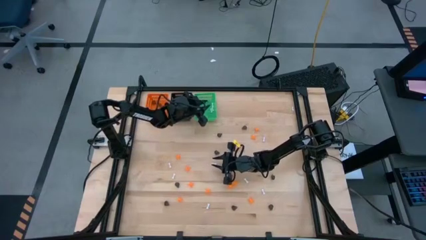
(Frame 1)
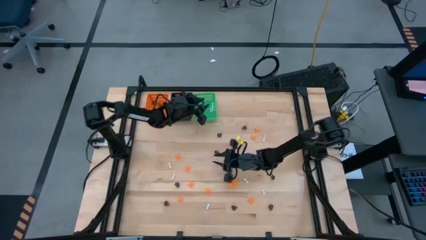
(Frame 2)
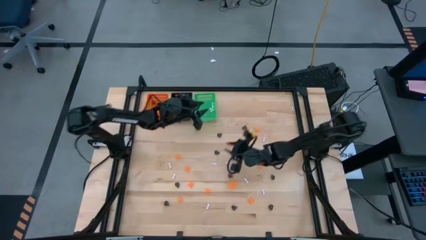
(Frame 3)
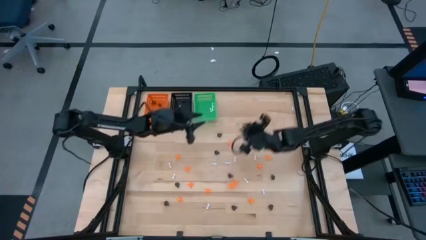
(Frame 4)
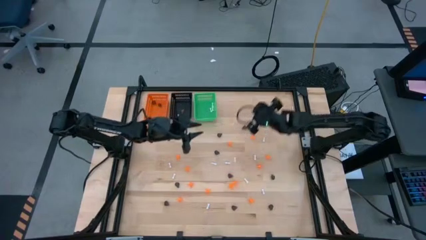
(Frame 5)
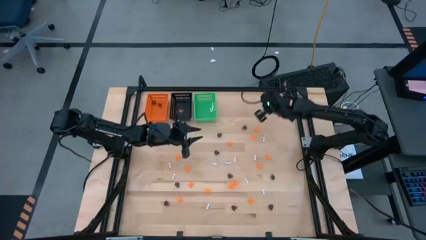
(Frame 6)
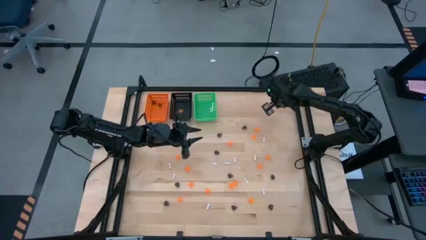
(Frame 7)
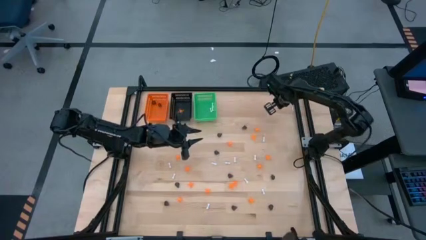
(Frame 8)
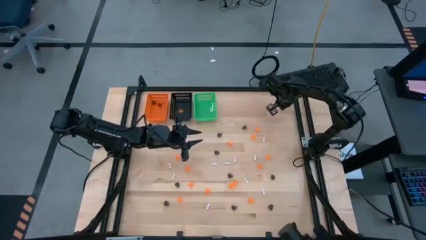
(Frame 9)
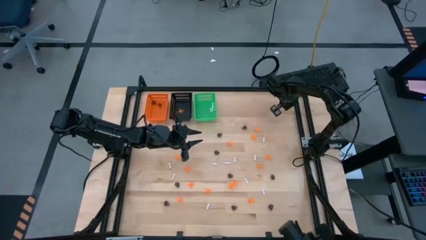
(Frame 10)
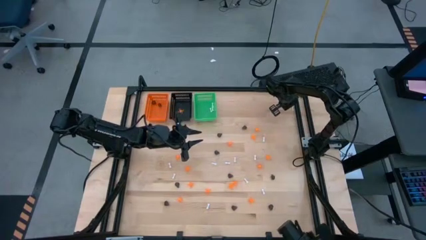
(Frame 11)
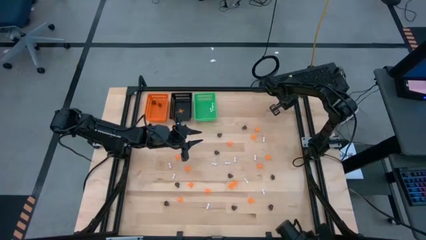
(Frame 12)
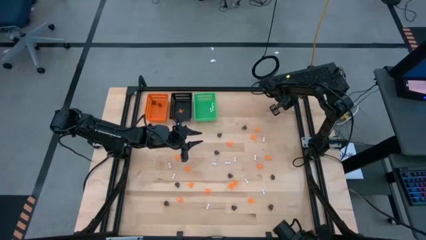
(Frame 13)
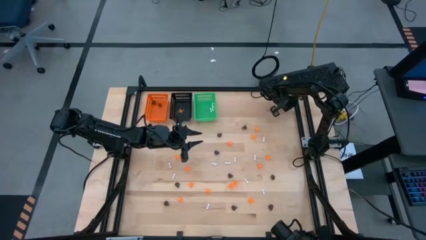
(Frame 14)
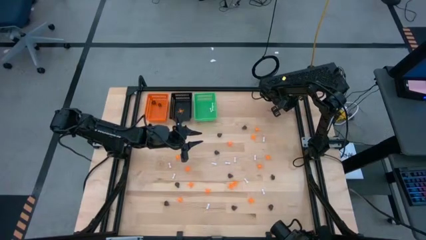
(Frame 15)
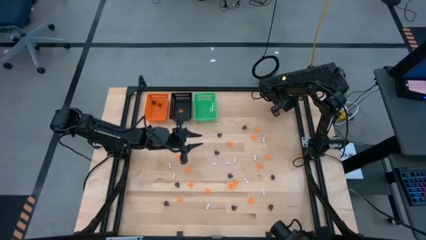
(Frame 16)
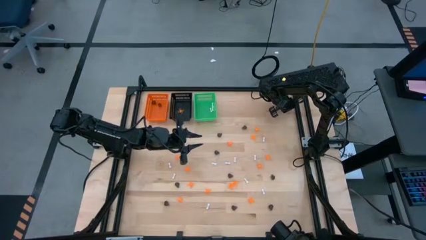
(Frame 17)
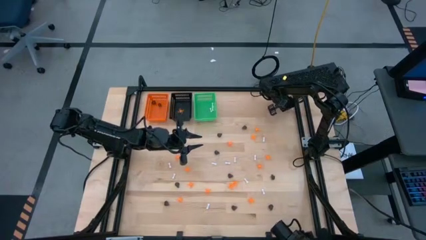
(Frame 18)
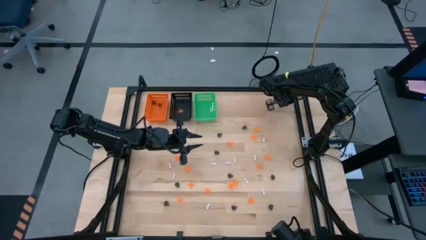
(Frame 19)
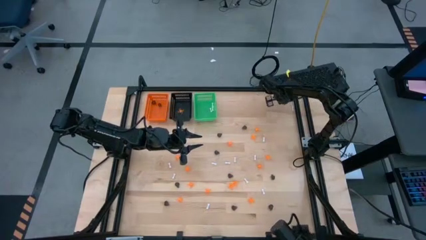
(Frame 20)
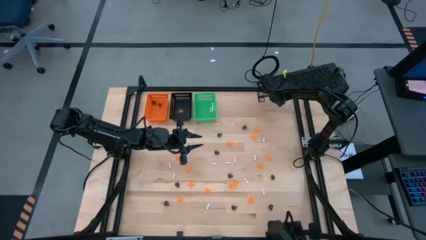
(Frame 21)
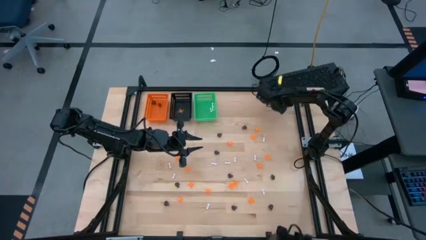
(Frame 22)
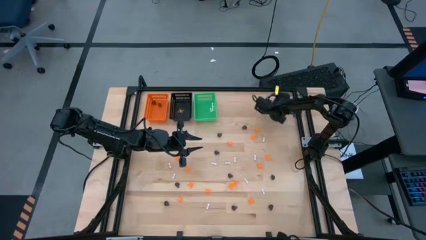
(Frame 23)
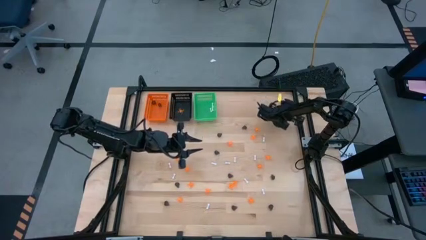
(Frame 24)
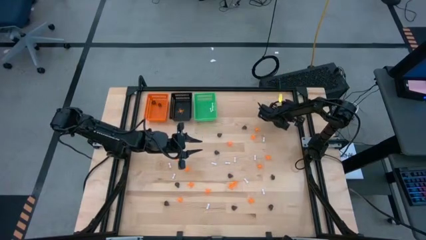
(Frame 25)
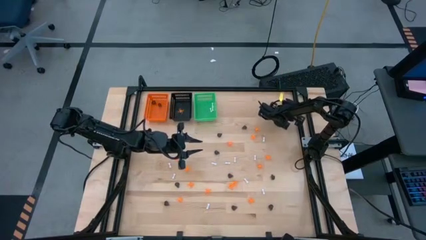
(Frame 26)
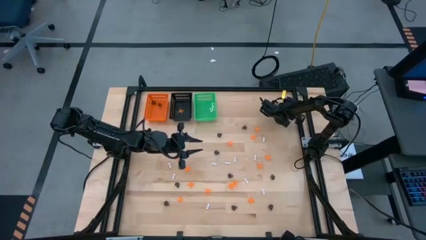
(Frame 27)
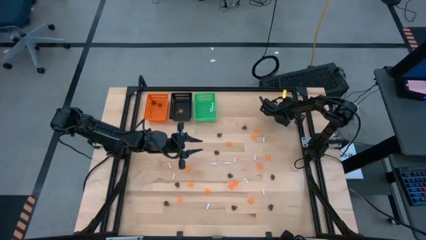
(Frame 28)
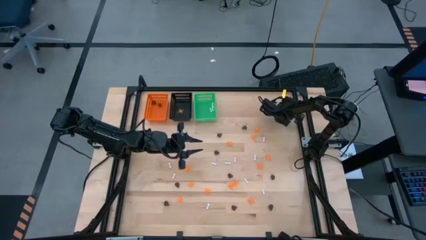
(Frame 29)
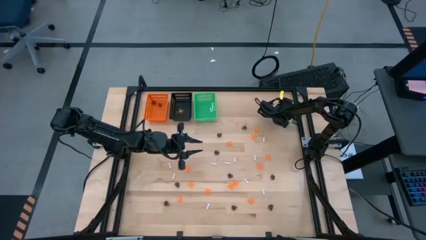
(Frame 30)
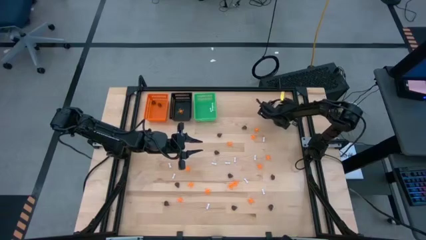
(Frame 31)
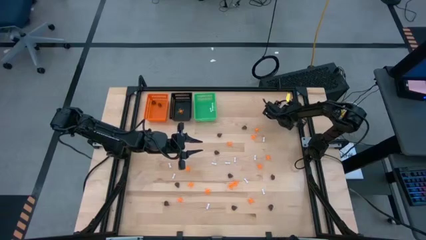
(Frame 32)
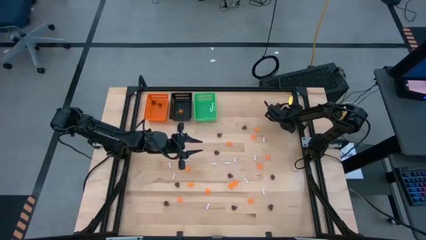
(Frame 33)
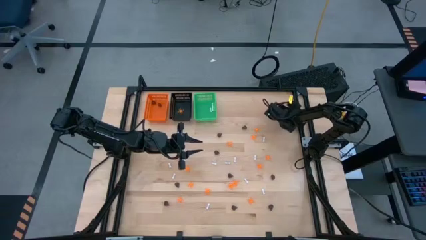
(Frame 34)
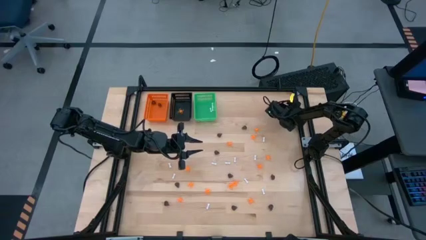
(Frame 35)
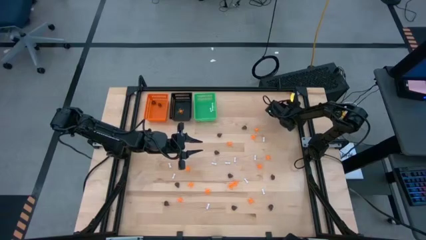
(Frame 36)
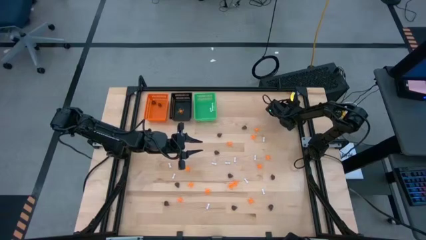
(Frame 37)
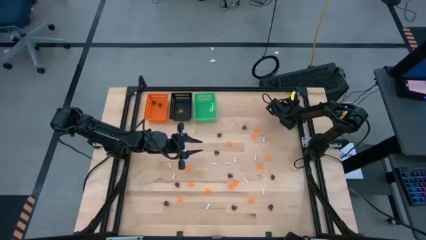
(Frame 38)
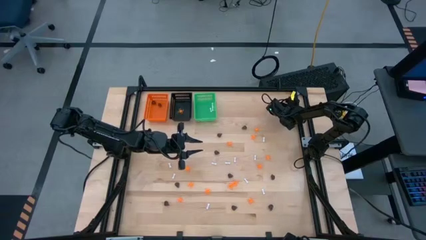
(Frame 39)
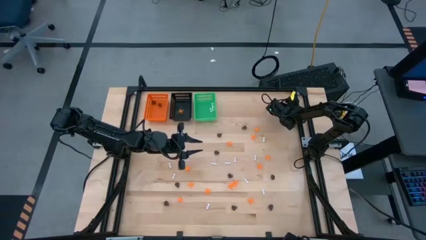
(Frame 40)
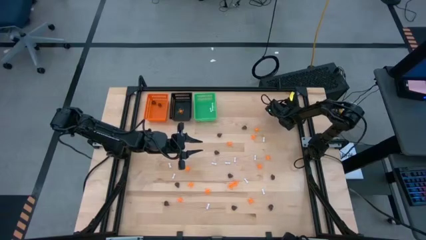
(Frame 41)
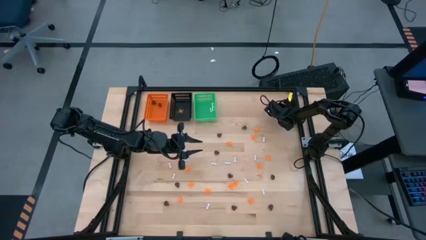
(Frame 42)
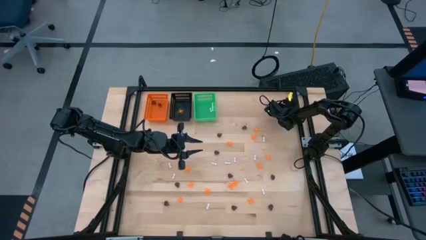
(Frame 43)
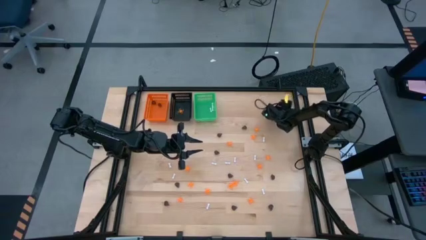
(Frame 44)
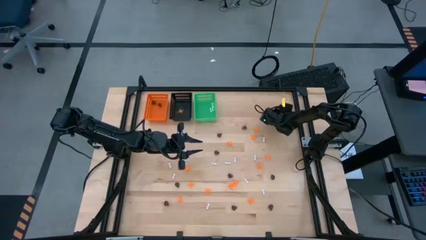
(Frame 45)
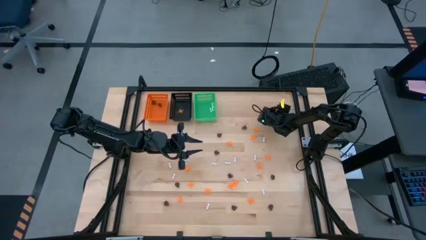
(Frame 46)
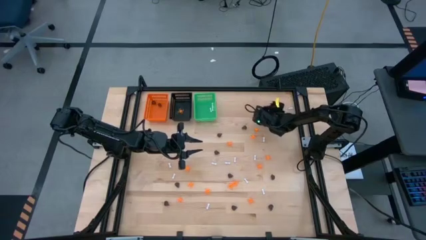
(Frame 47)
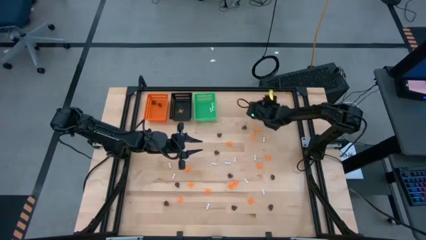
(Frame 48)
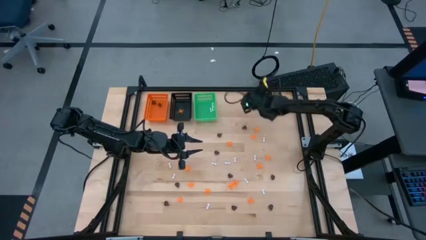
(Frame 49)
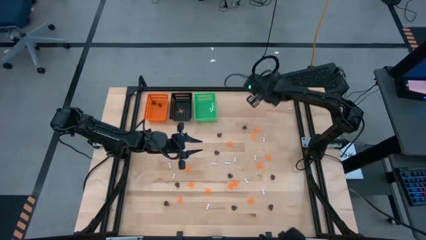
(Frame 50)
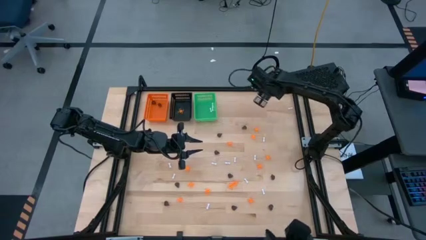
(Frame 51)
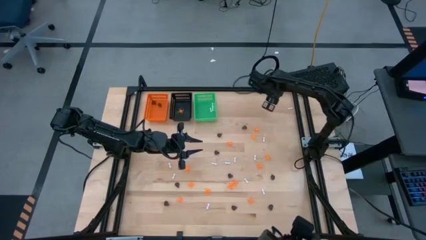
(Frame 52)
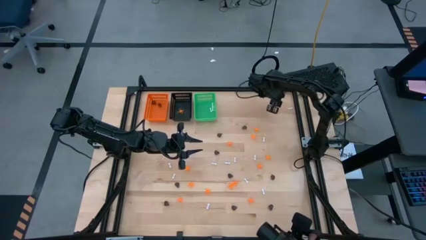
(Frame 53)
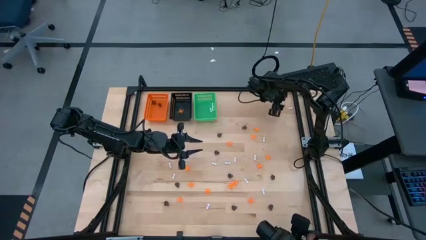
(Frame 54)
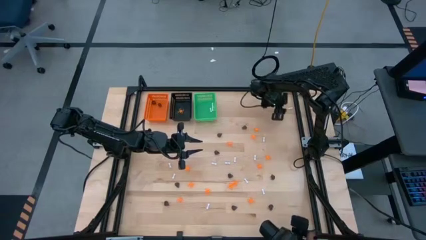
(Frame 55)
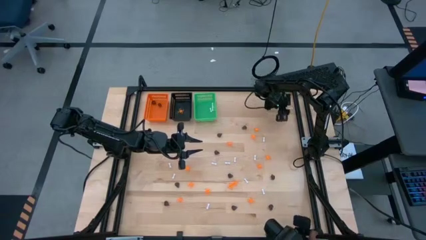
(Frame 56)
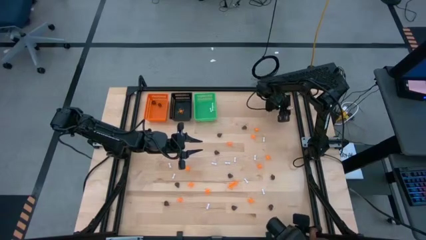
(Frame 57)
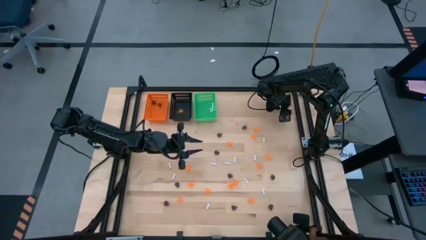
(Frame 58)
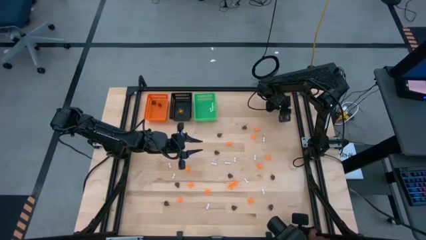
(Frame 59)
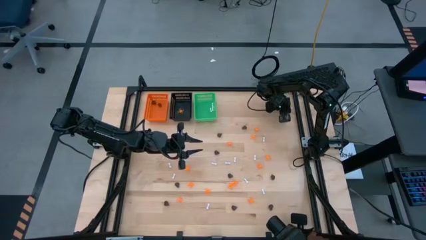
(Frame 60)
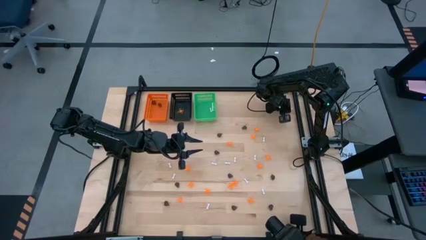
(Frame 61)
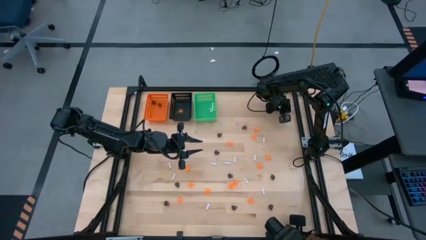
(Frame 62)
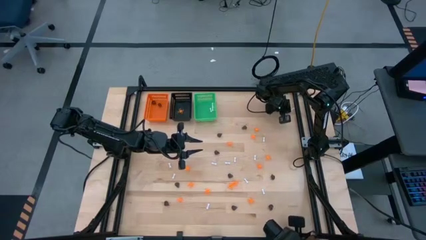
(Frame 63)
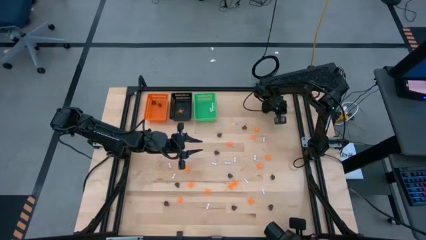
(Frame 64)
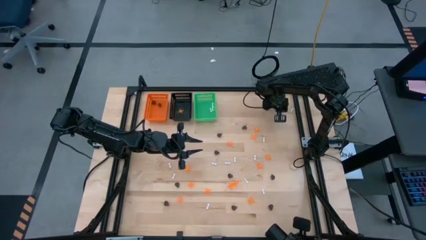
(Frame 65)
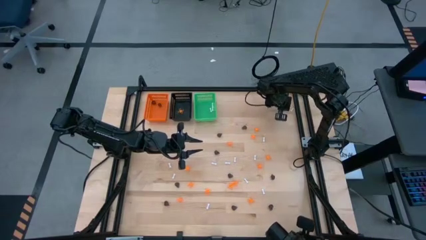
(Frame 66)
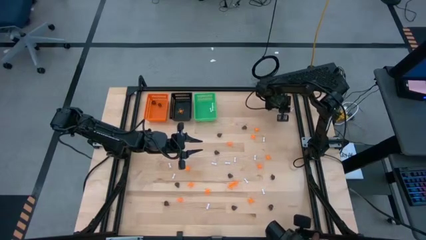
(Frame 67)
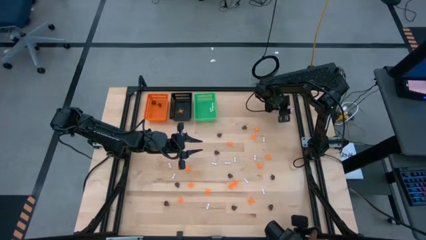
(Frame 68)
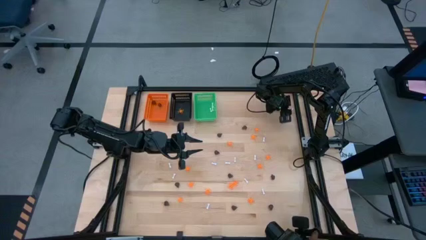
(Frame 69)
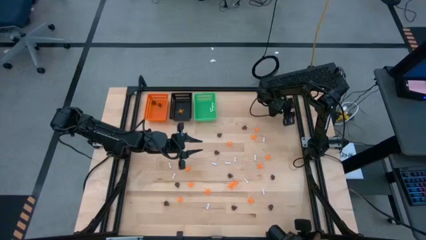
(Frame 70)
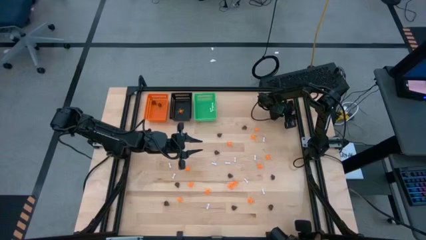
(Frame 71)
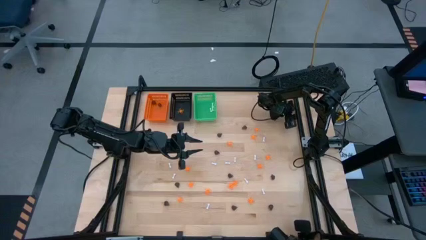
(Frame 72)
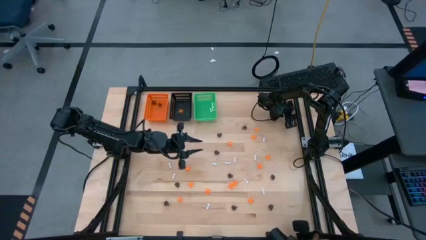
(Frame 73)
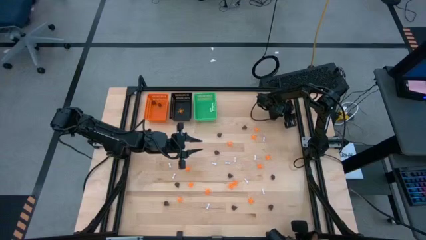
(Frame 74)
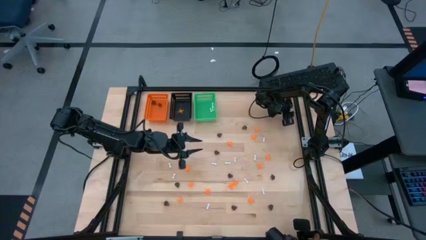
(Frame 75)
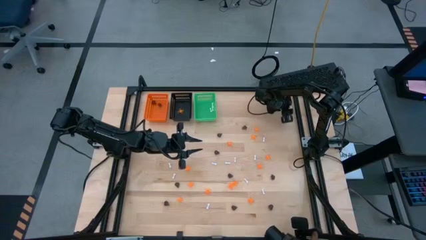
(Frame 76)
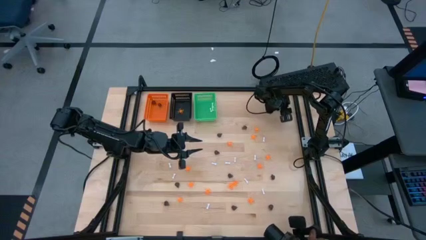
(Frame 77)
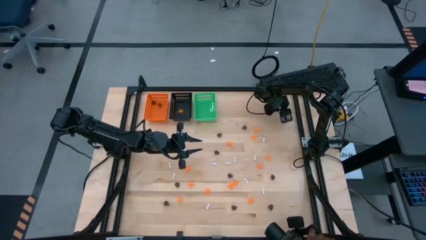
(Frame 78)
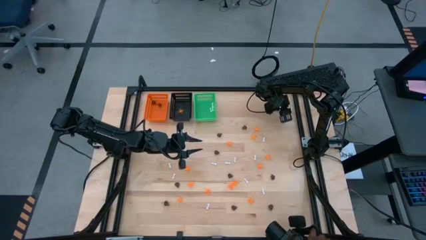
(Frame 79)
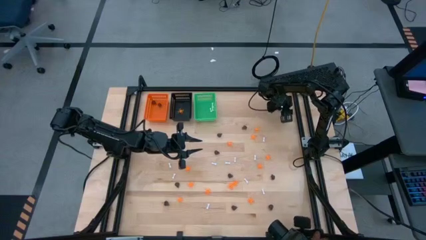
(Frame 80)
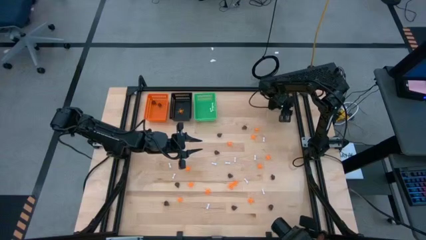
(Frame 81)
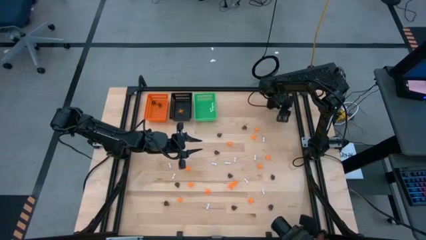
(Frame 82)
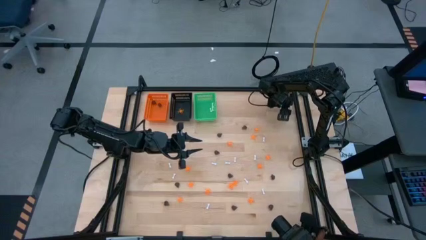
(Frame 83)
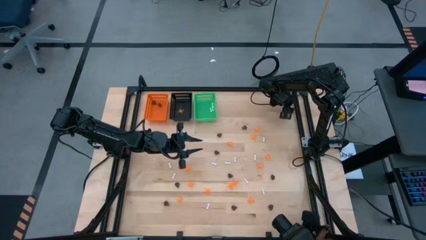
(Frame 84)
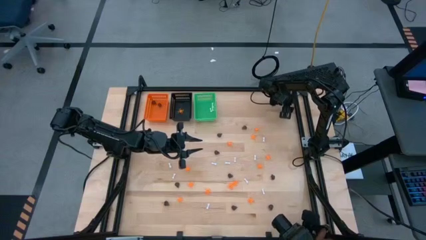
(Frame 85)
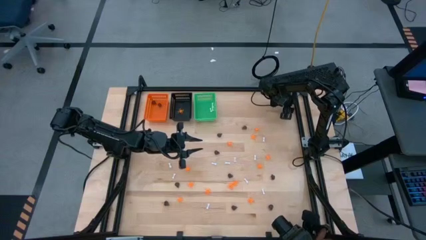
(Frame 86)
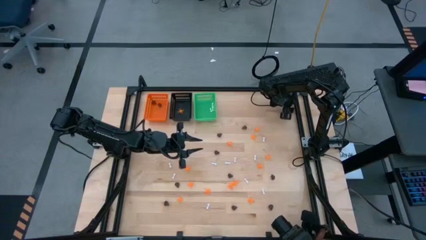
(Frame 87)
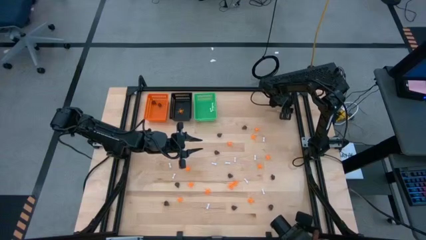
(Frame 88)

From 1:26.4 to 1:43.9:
Task: Sort Halloween decoration
Put the white bone toy into the green bin
